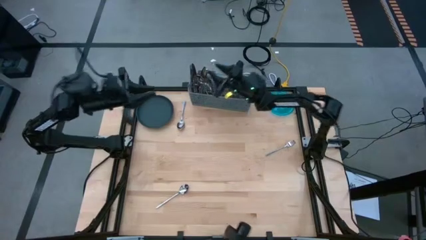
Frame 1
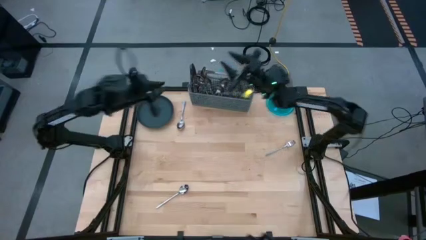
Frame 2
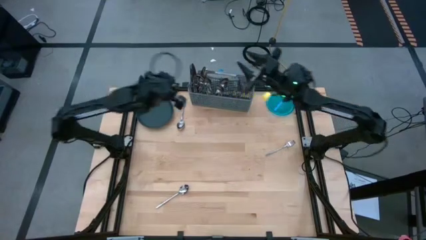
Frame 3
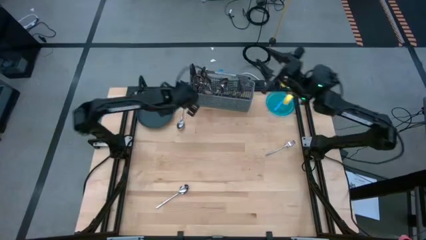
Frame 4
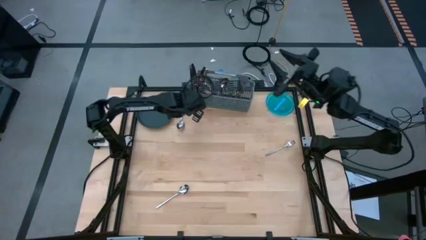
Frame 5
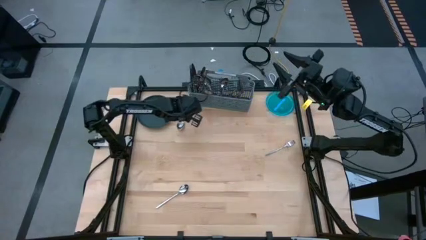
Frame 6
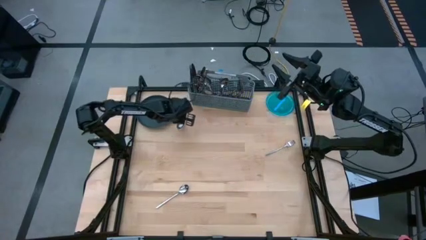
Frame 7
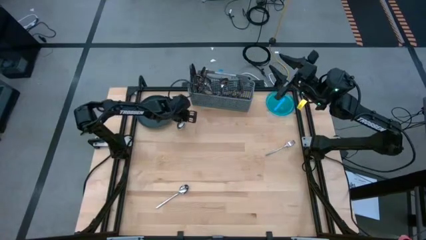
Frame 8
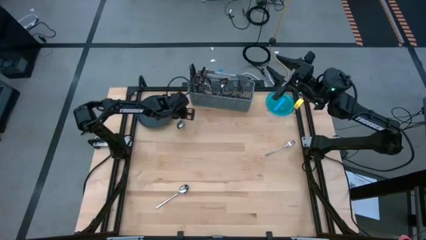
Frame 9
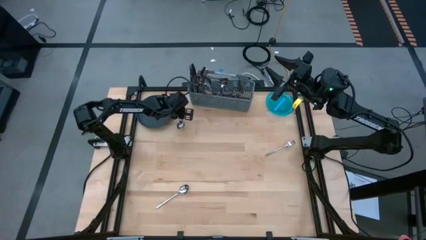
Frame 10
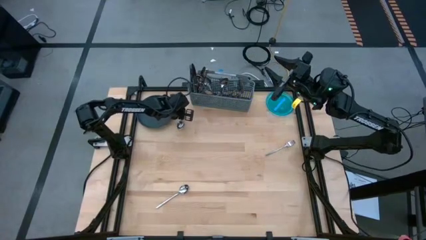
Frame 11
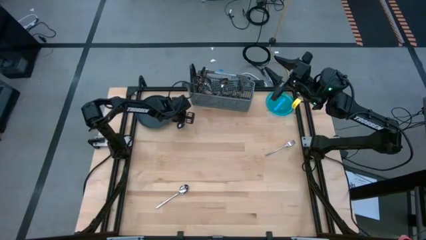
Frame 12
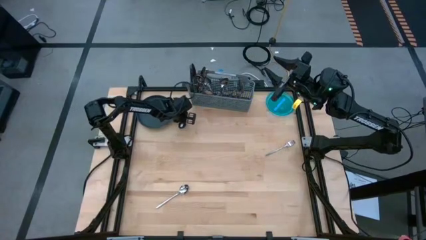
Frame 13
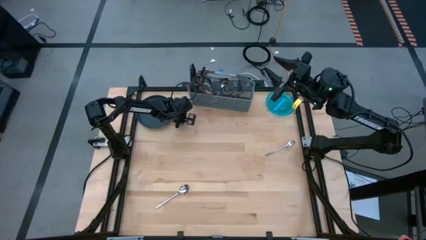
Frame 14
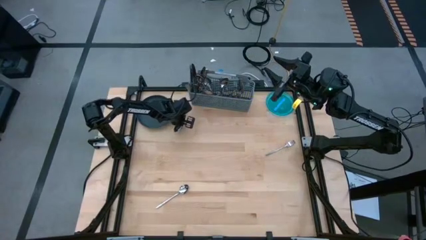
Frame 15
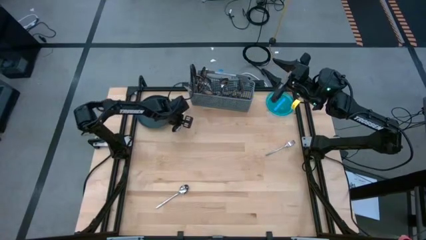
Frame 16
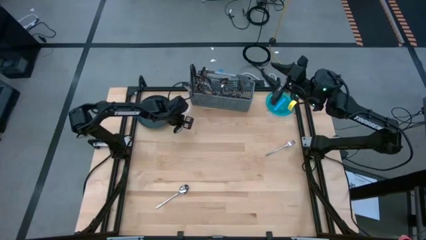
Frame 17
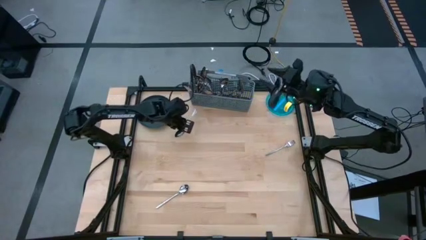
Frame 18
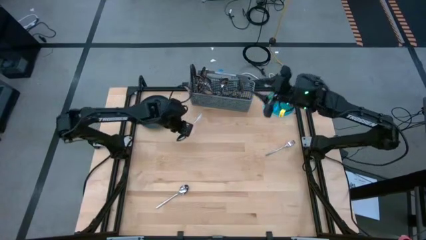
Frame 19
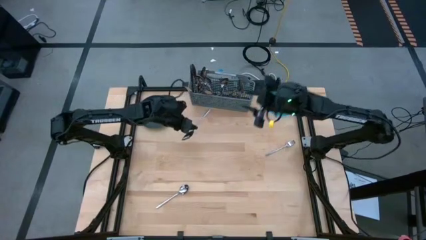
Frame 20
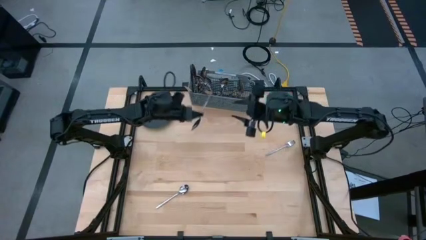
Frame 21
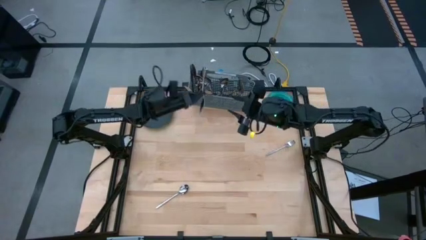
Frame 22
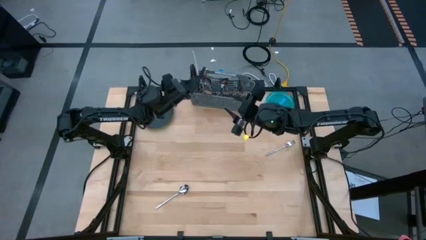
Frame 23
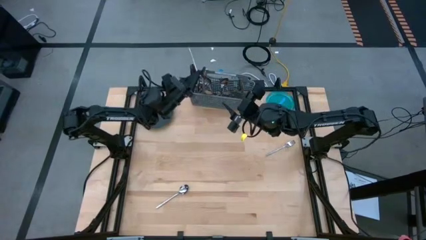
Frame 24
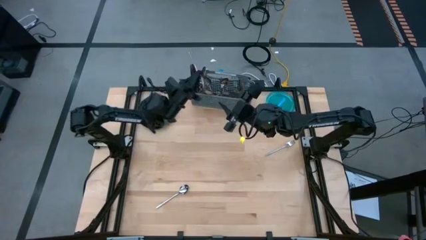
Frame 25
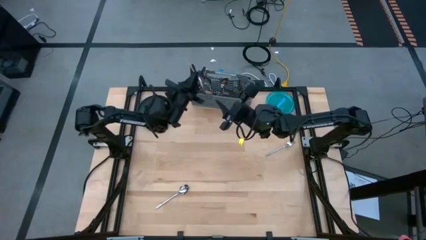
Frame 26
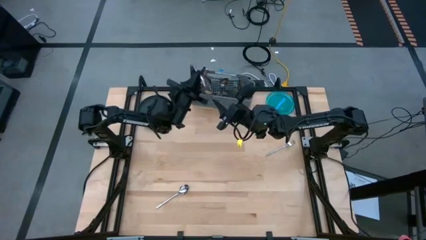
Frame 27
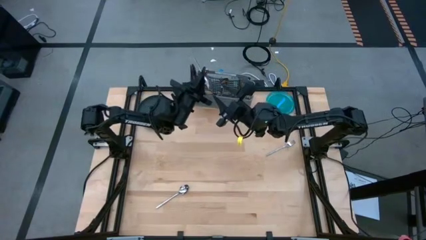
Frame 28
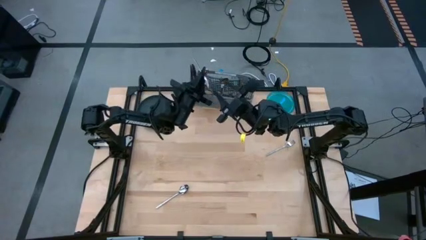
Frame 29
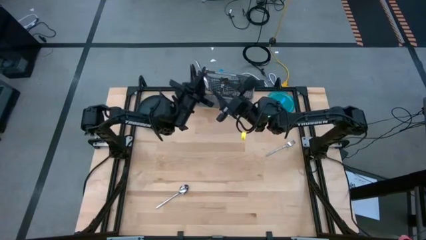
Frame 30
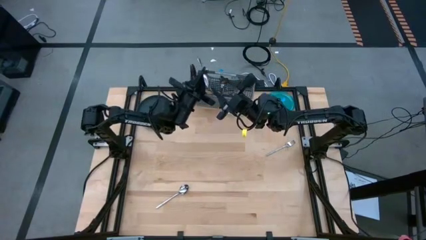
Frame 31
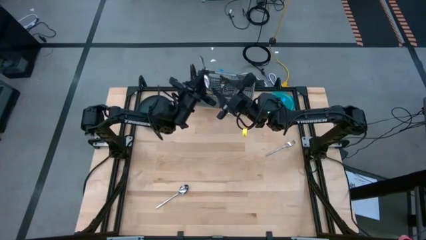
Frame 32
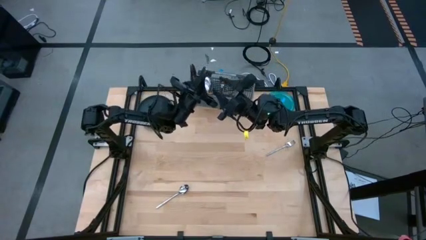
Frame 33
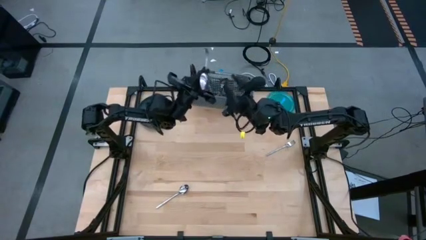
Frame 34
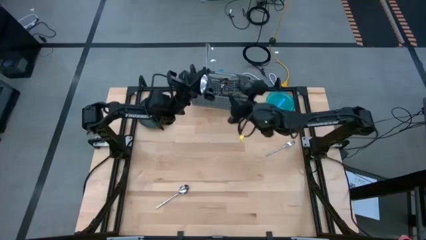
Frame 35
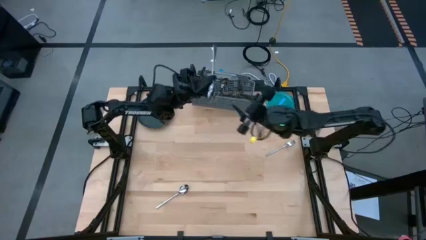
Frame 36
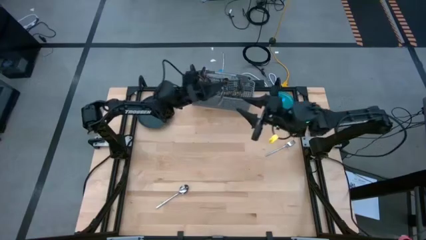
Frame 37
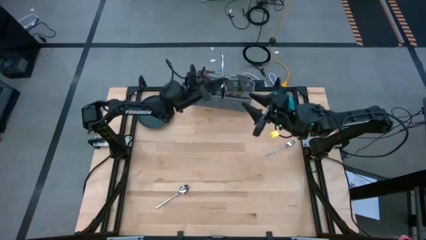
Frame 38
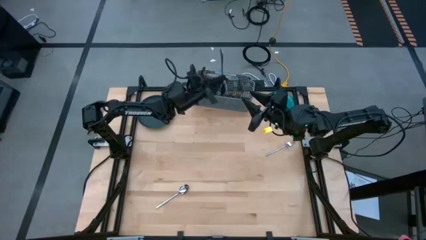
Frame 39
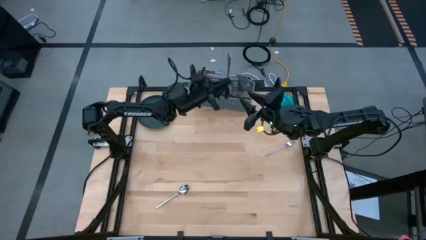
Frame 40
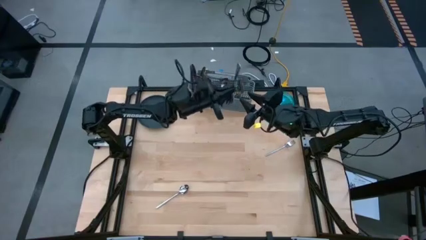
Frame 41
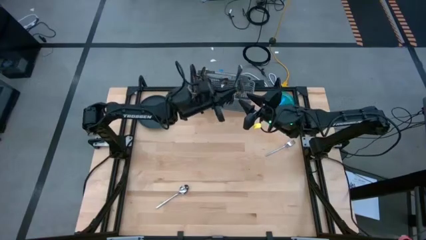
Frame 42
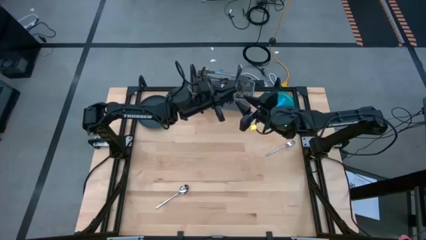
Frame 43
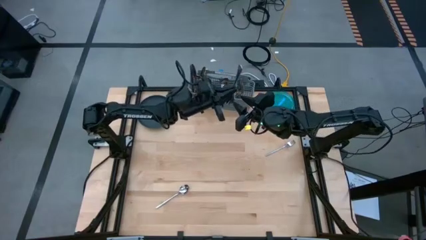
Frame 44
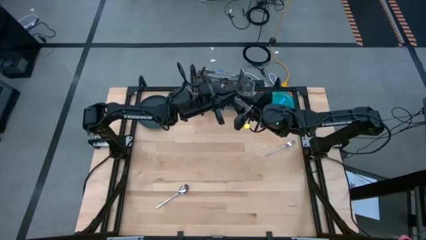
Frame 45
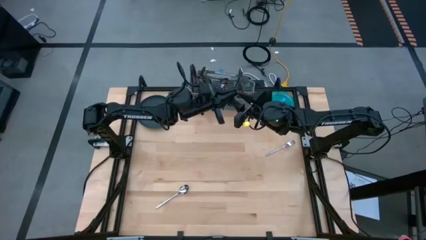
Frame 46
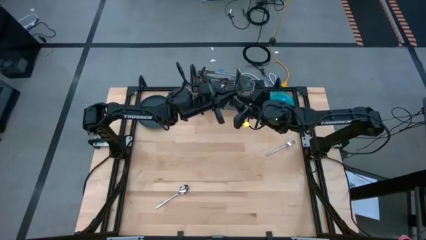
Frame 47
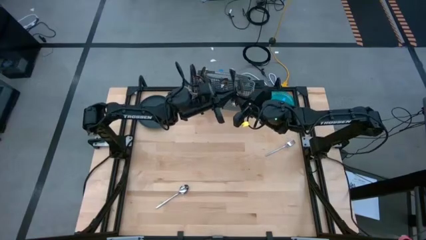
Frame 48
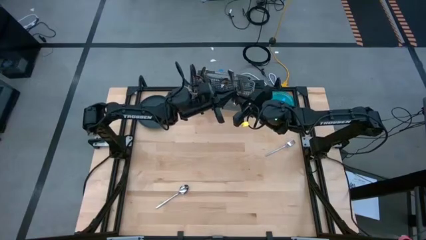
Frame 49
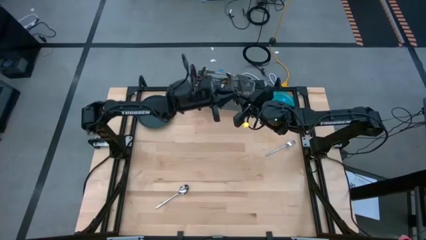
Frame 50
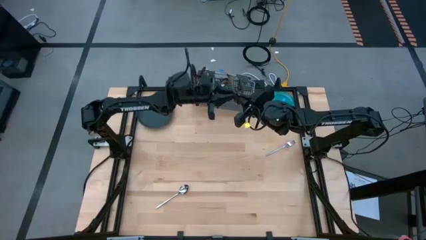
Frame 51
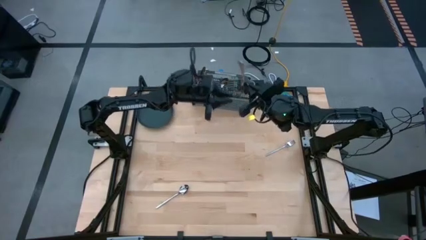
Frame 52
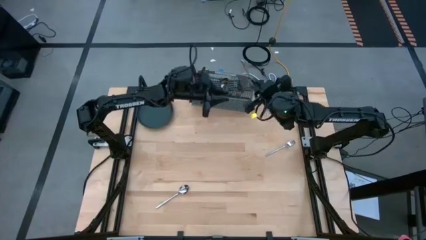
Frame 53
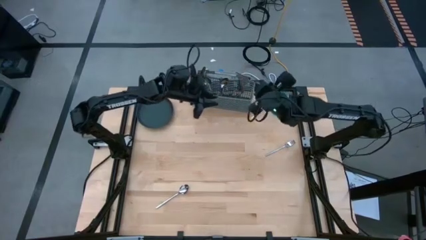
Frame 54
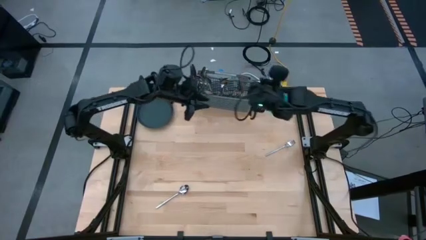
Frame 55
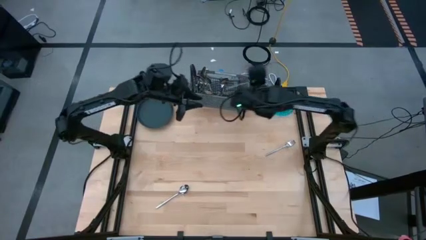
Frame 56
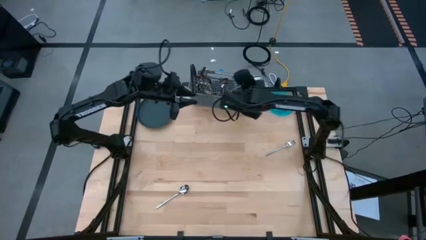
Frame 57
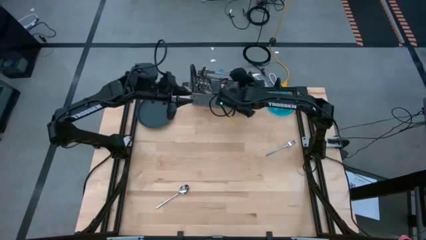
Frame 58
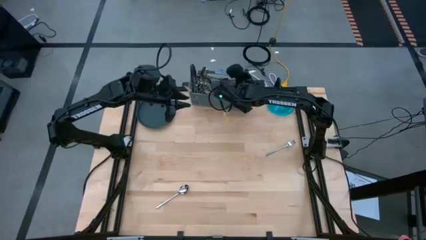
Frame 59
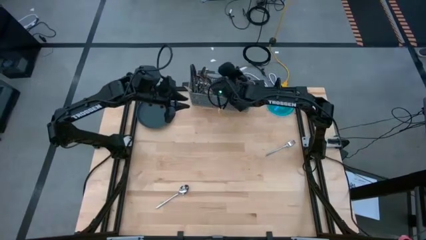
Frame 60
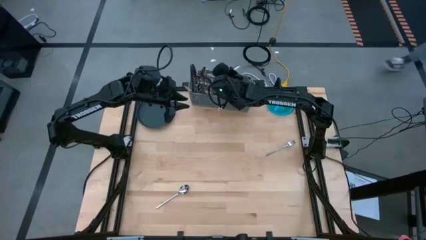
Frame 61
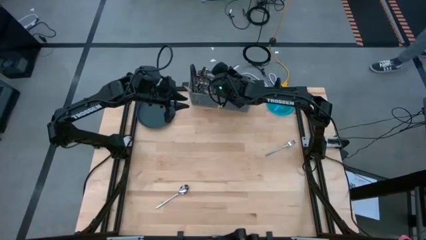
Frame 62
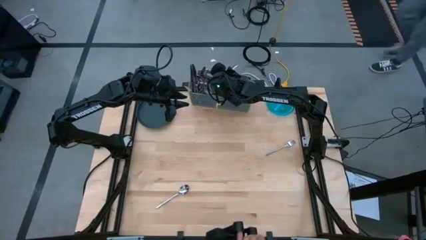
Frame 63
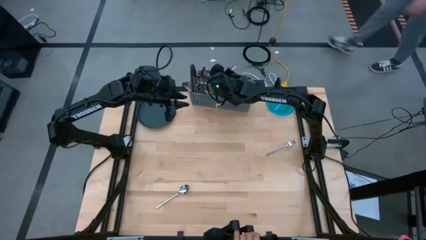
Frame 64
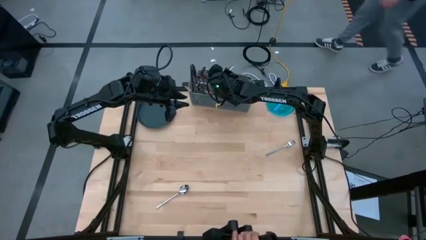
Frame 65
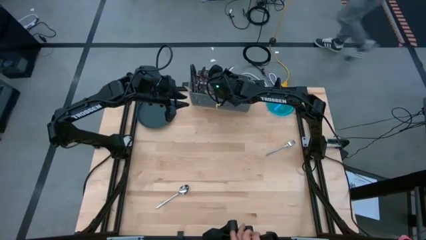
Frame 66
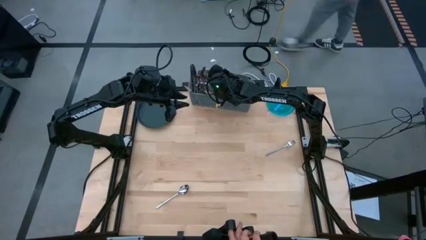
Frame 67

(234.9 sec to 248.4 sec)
Task: Sort silverware
Put the spoon into the silverware basket

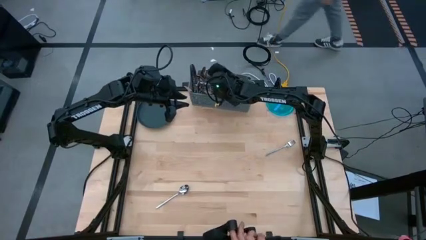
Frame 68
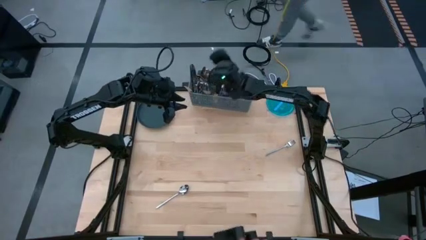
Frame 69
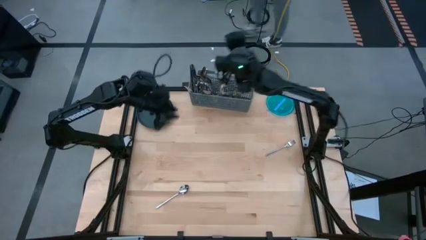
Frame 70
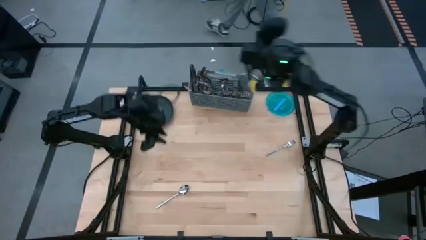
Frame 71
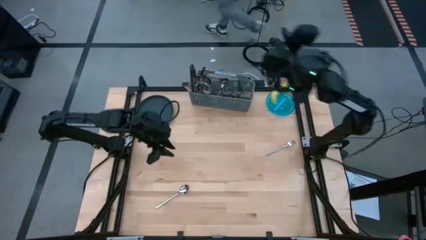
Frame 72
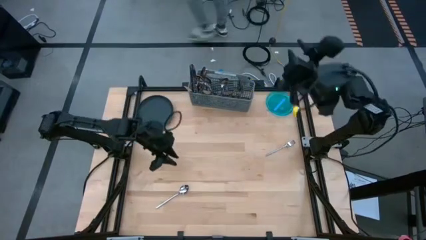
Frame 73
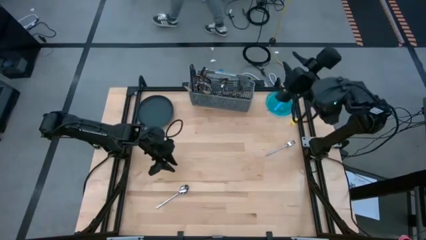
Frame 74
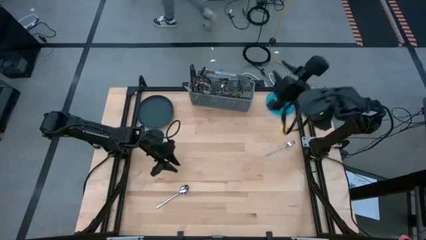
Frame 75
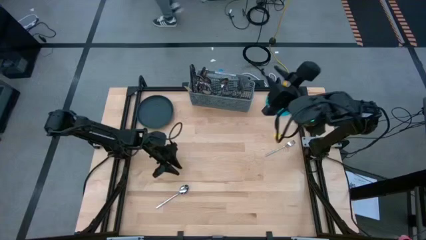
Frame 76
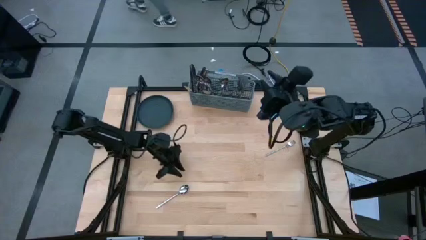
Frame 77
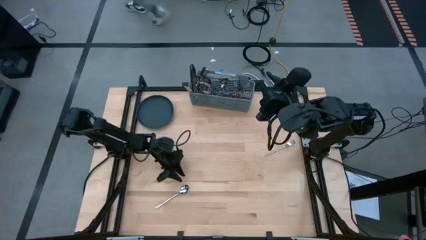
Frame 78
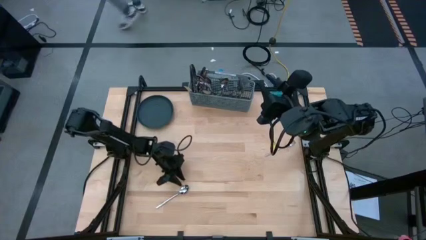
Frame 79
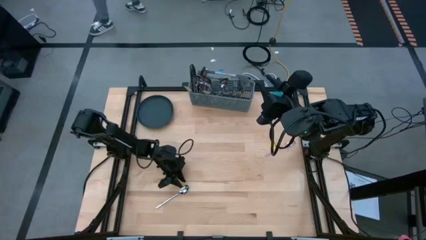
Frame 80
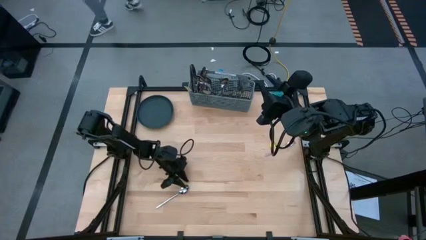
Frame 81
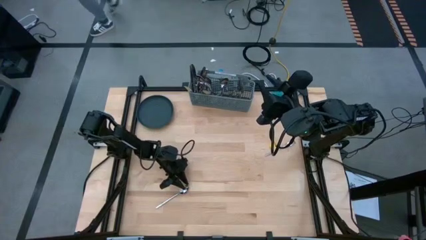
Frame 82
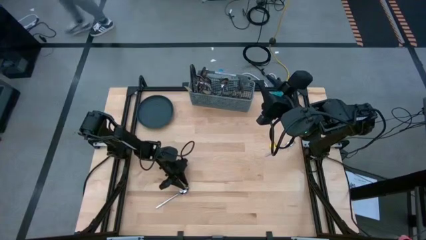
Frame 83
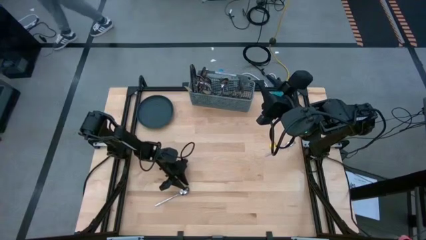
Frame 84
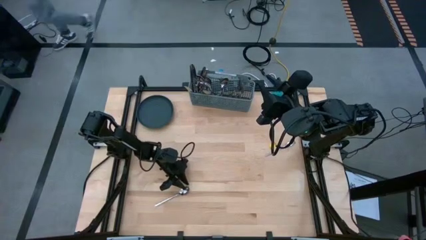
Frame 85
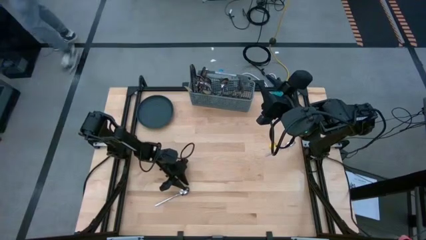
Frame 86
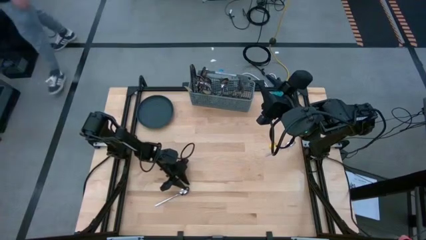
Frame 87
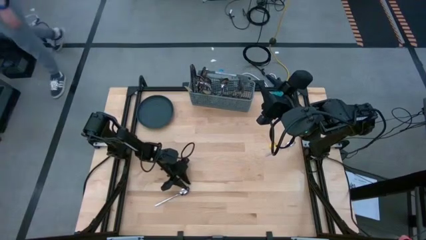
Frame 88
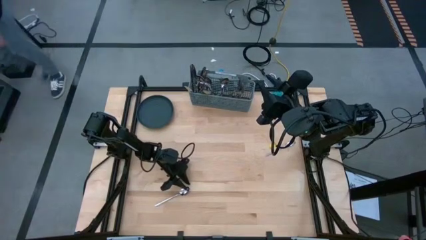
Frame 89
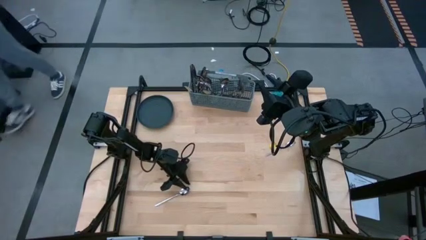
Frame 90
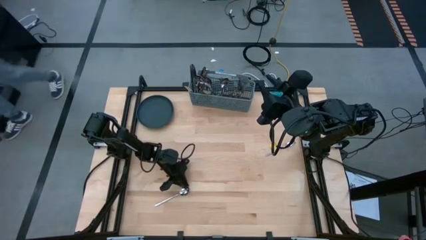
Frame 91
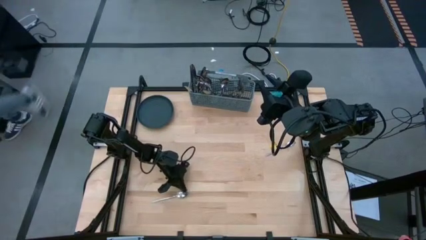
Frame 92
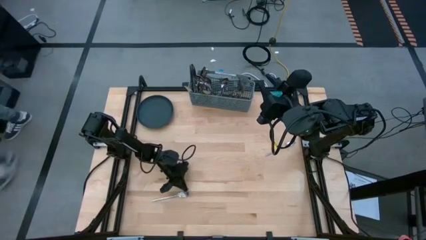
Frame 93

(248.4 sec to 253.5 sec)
Put the spoon into the silverware basket
